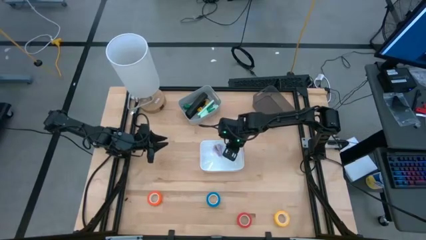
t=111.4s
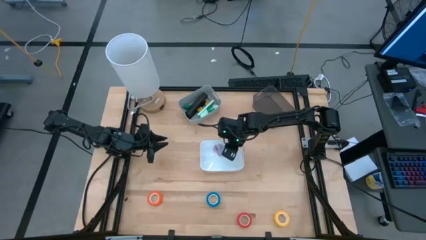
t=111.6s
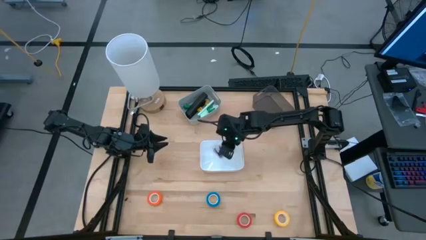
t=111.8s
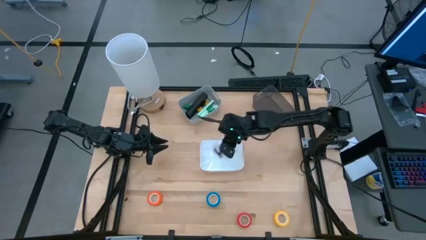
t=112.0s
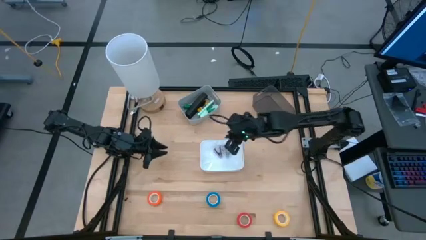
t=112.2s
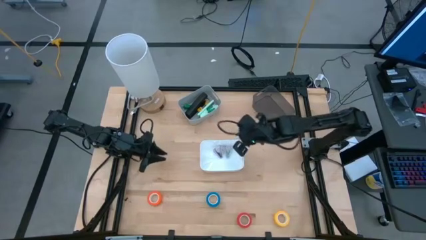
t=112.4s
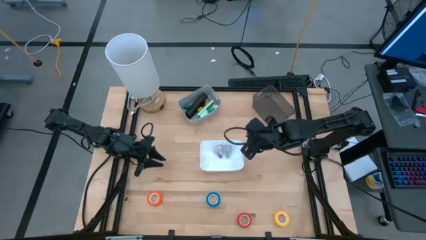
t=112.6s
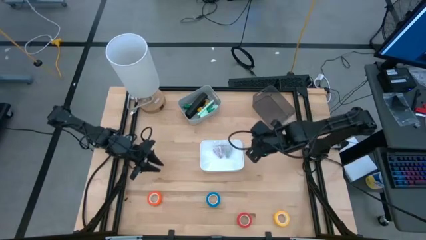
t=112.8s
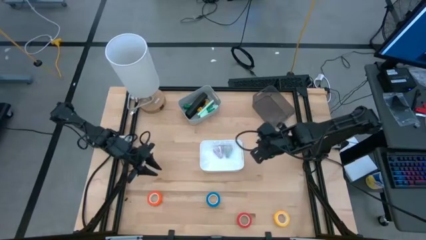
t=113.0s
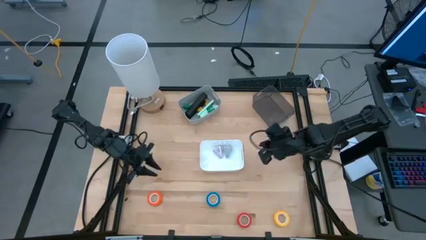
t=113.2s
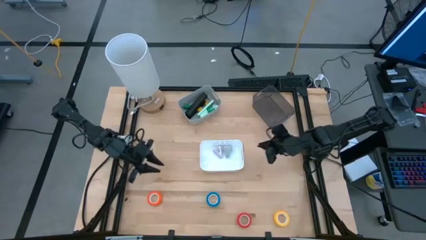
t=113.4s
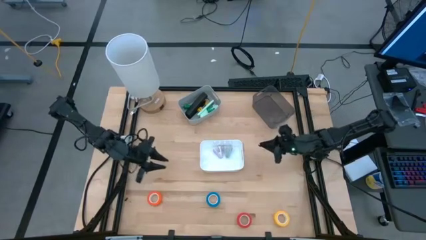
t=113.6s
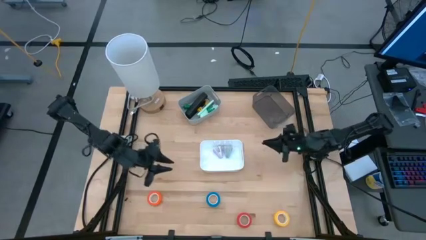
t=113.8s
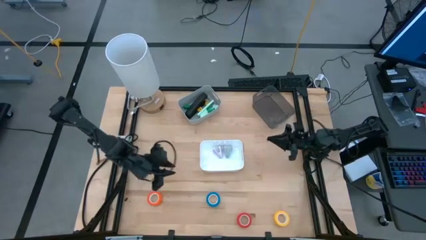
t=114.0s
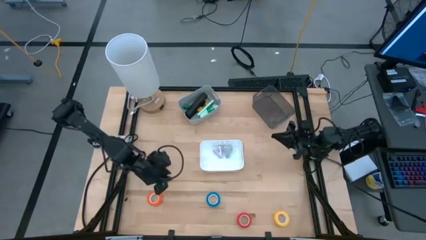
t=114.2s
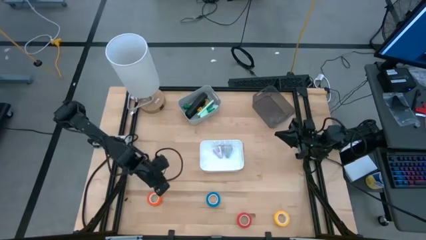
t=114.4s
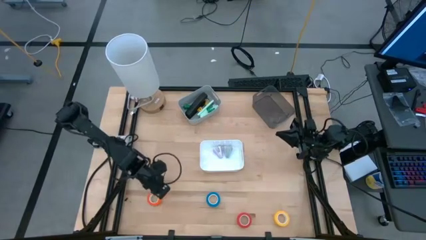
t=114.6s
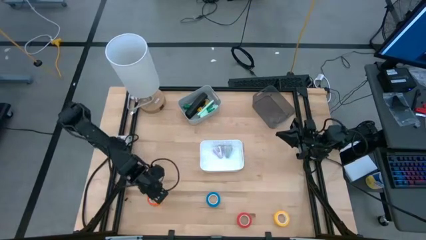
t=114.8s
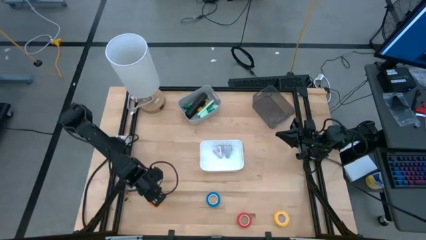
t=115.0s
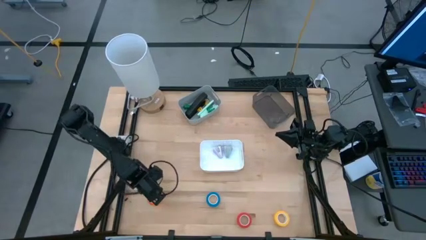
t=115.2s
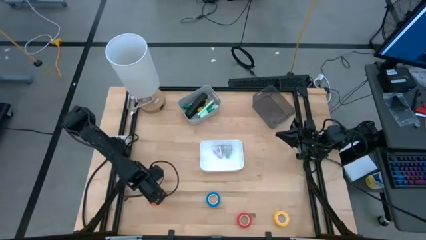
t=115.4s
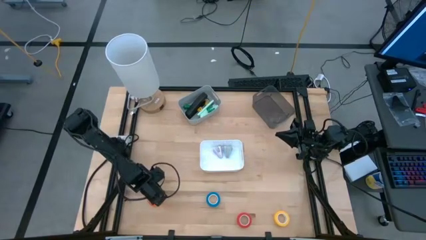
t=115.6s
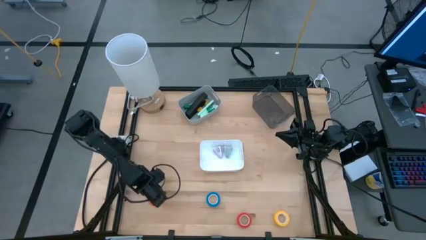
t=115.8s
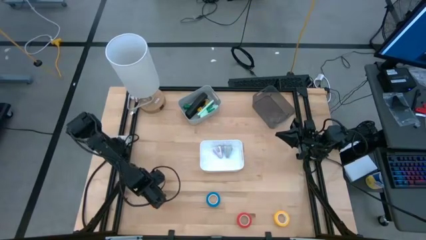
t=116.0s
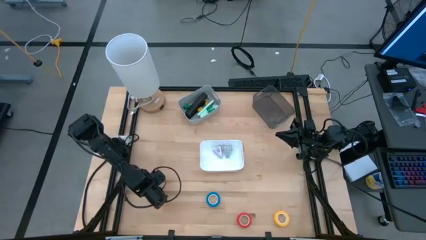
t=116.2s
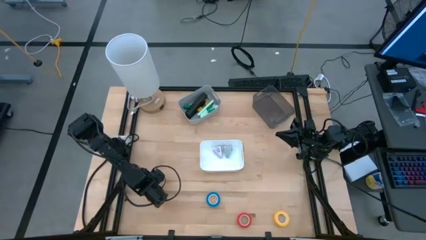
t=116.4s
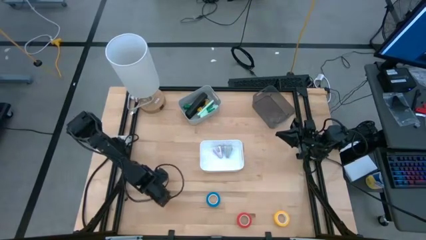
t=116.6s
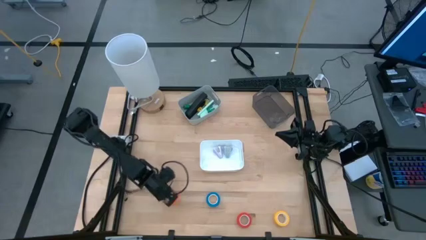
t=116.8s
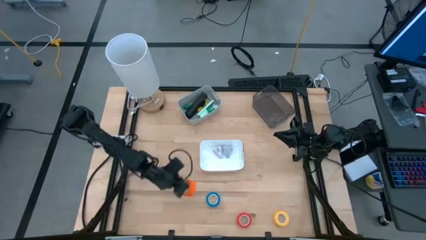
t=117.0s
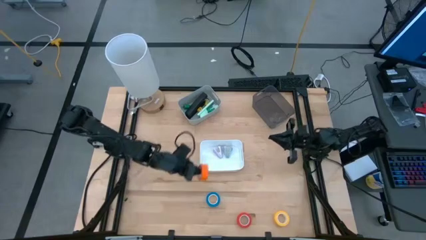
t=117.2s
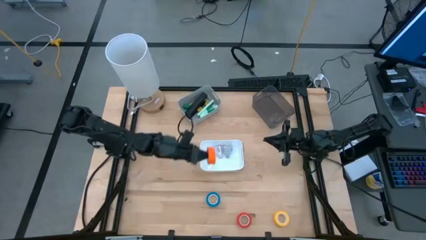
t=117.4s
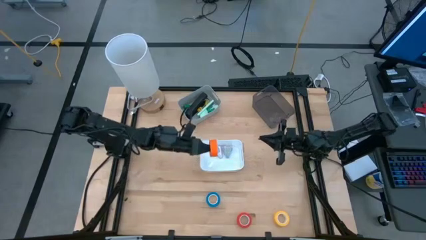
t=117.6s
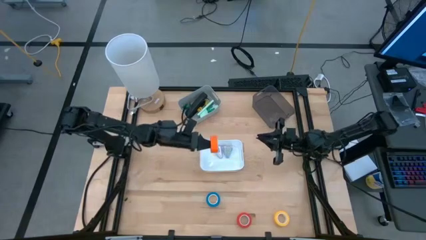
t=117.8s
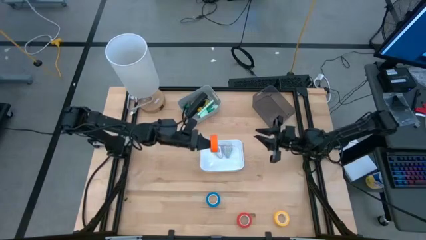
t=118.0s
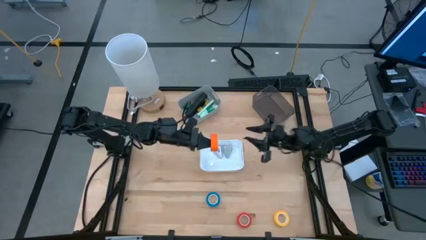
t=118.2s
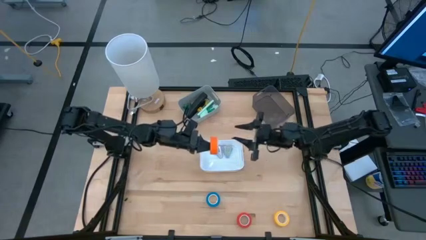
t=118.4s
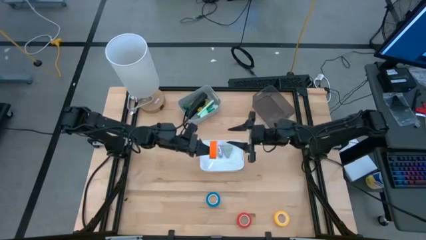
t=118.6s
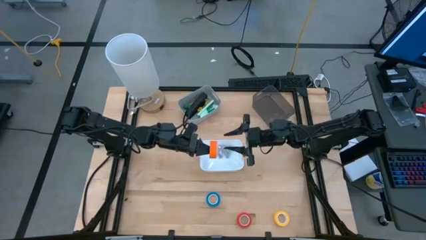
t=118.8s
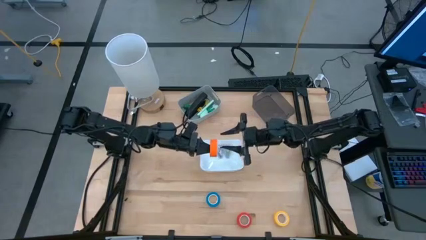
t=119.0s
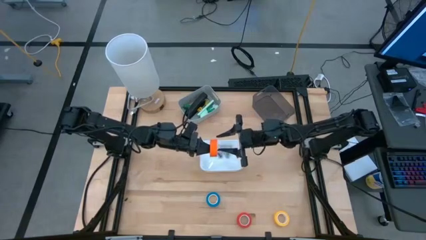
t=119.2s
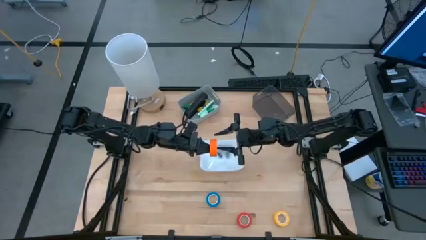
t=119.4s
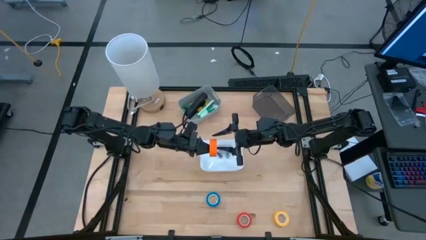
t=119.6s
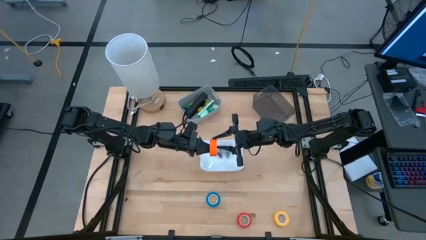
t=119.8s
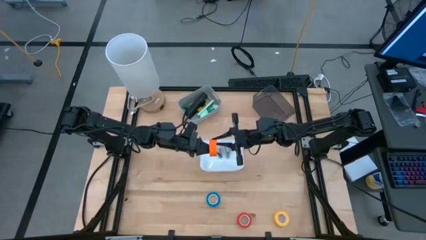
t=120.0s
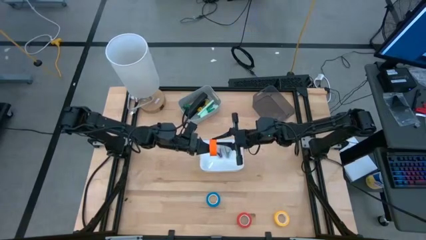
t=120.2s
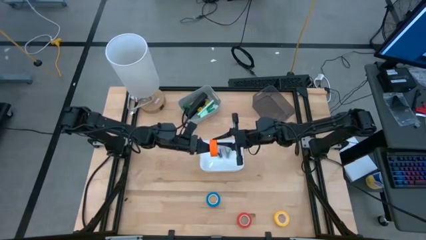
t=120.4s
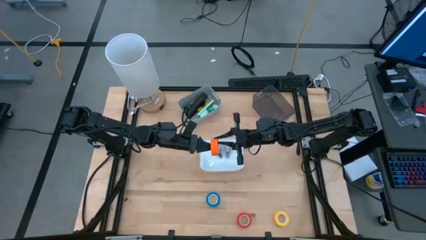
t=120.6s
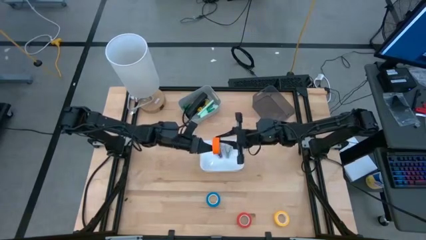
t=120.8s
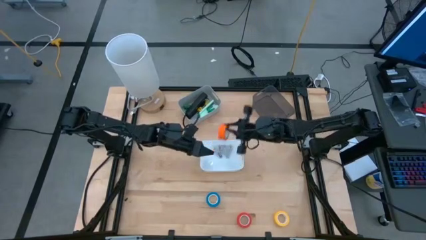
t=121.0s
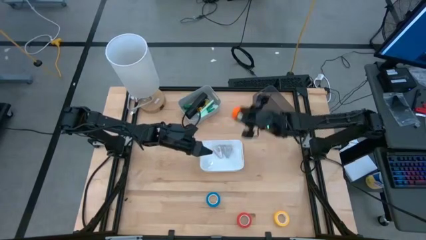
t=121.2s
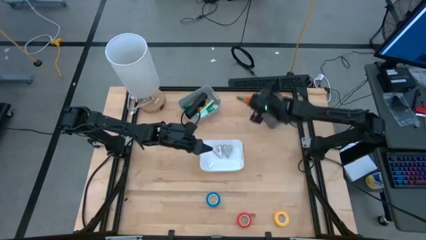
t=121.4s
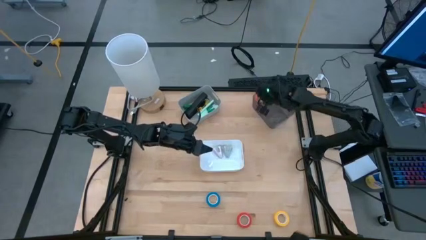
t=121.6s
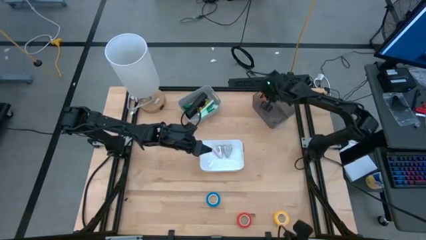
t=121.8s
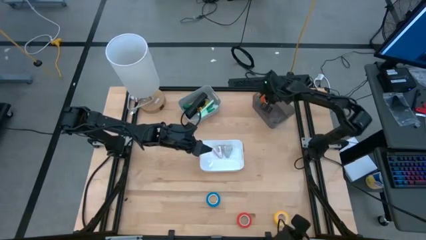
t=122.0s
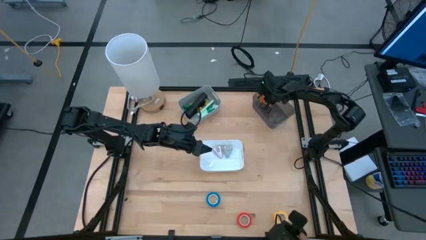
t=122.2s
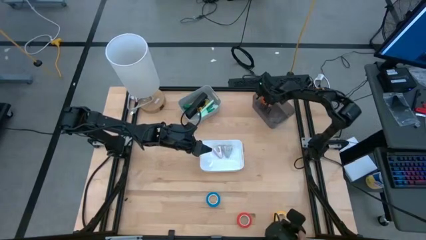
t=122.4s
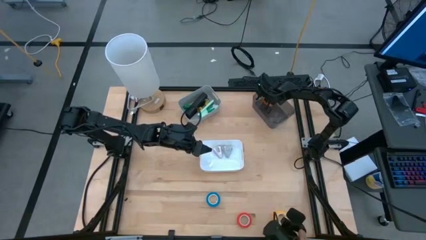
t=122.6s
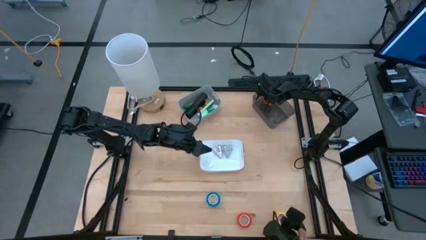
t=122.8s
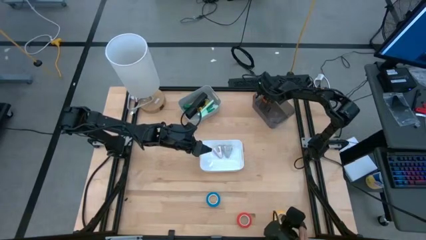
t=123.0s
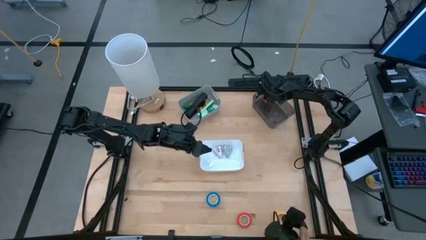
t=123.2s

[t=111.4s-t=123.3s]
Task: Pick and place Stapler, Stapler remover, tape
Put the orange tape into the black bin

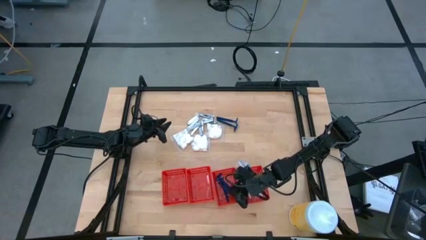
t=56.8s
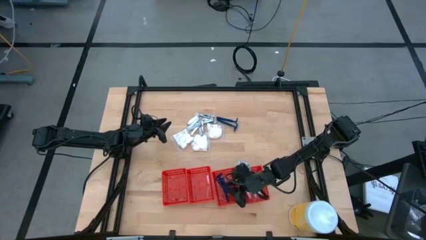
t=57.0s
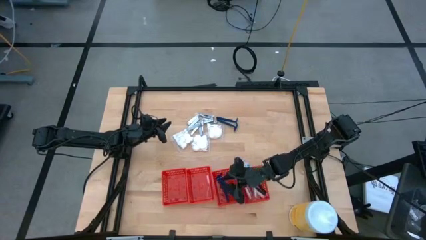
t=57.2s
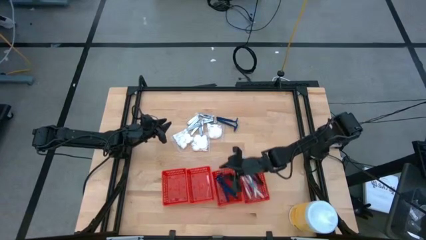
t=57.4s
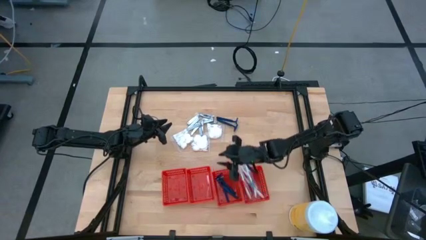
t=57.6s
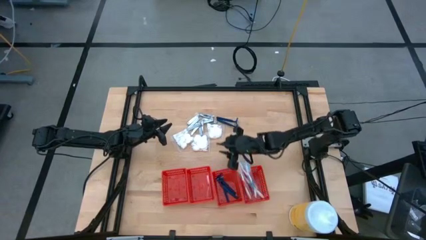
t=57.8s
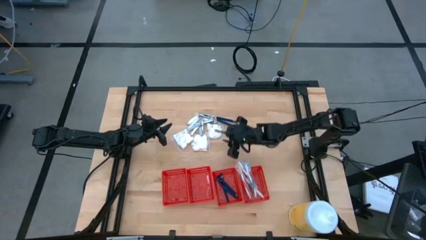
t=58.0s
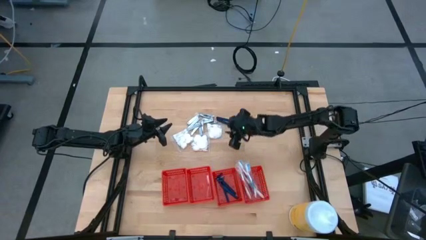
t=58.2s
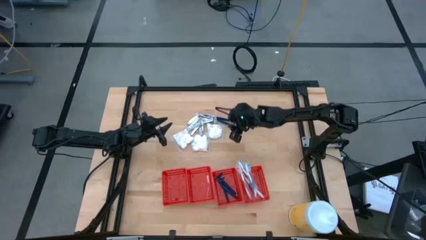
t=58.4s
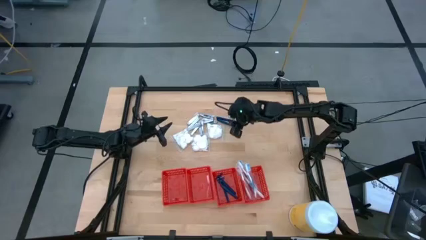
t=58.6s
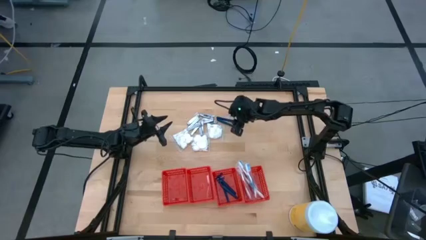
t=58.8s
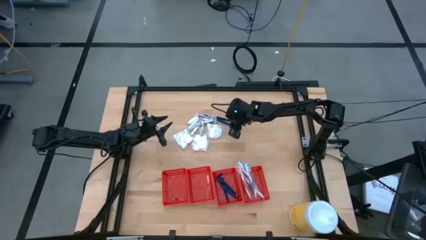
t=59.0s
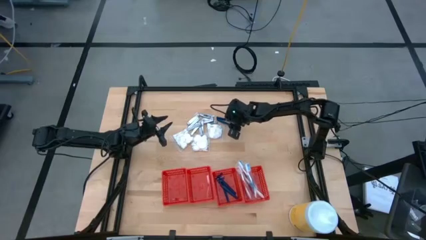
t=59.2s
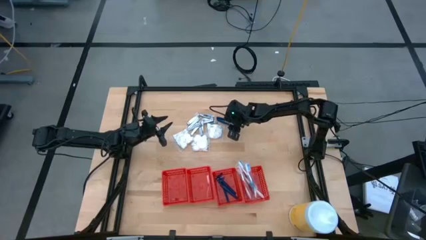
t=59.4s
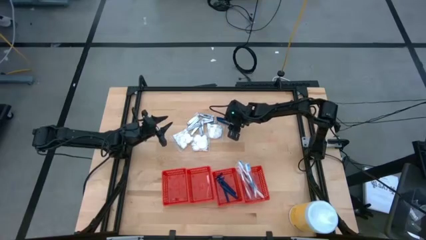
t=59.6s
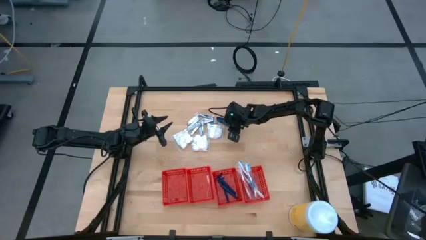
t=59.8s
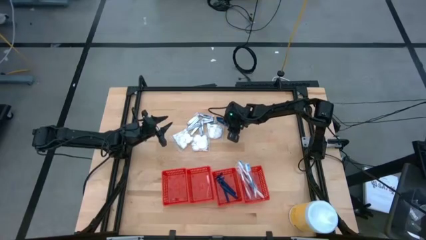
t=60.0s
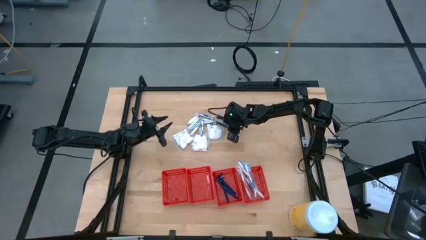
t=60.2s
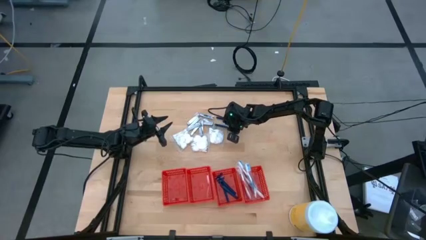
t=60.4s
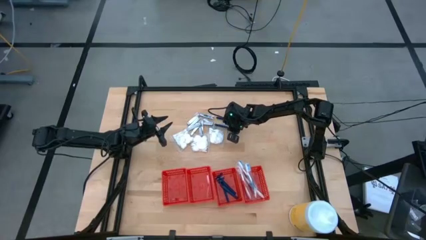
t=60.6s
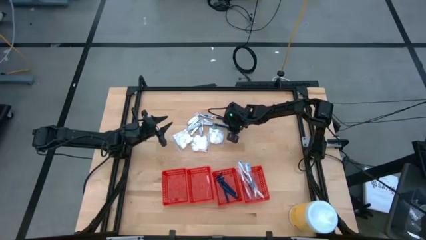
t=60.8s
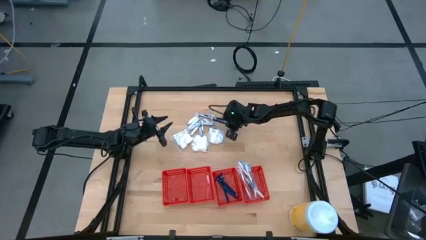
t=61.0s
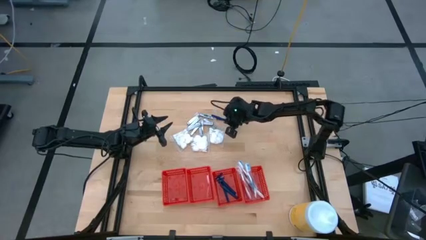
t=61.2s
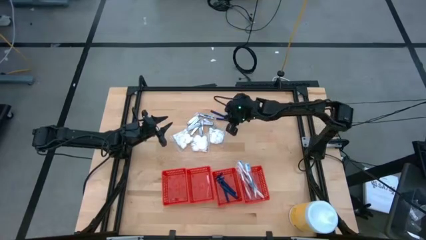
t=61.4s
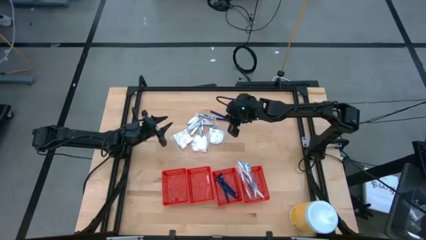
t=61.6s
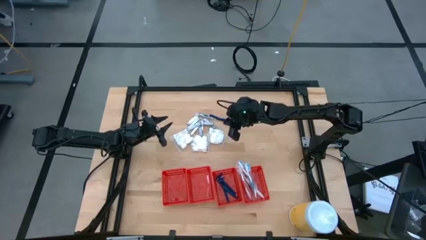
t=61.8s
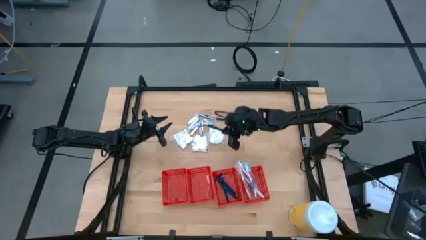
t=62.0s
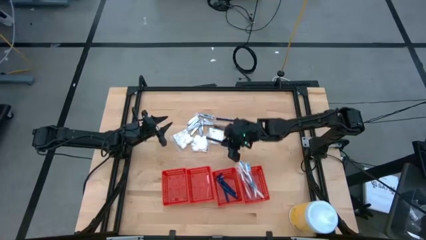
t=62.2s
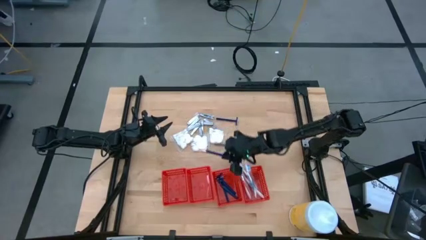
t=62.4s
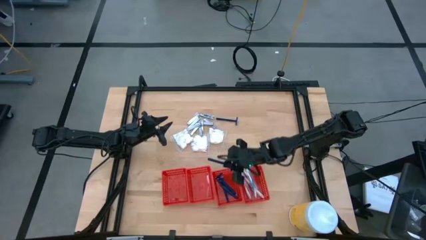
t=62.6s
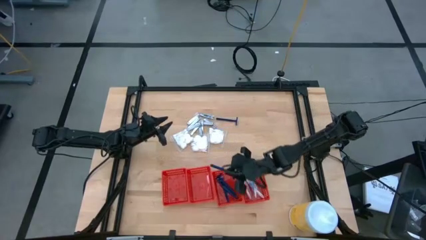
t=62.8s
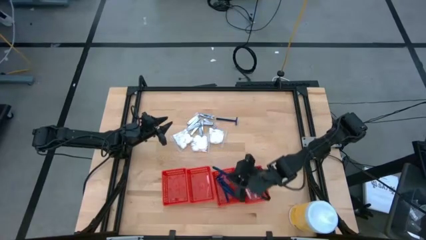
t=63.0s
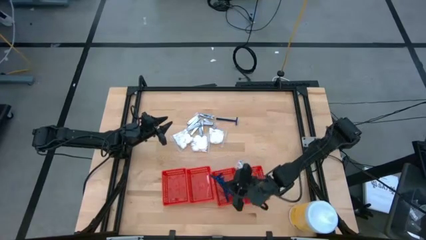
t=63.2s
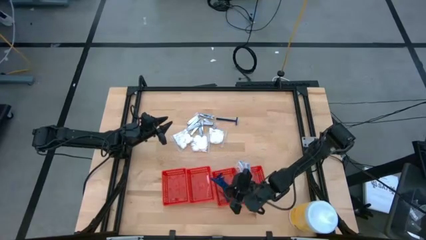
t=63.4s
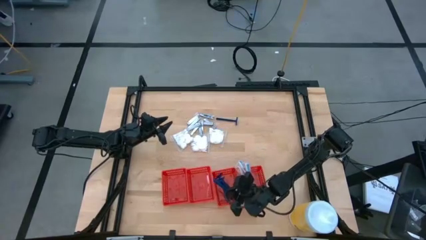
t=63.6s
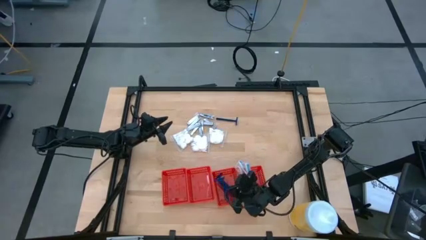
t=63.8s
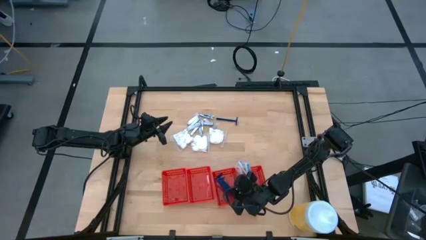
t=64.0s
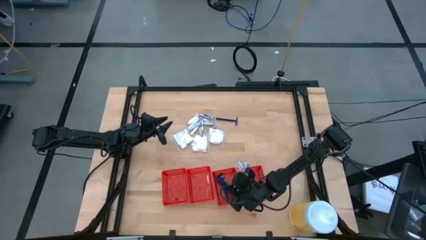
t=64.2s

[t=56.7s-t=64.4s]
Task: Pick & Place Travel size toiletries
Put the blue razor into the middle right red bin
